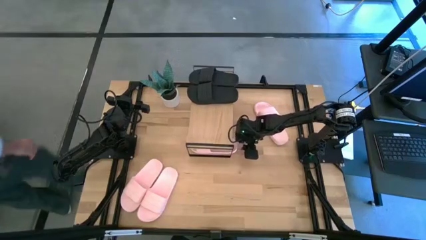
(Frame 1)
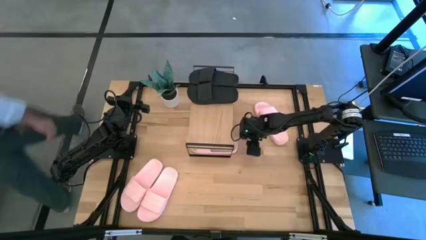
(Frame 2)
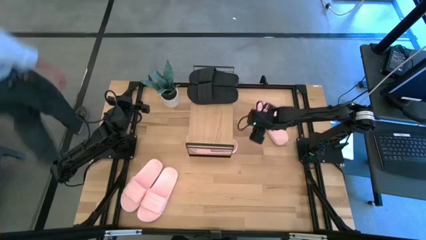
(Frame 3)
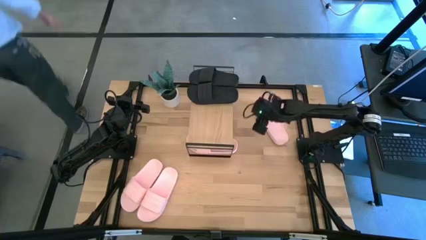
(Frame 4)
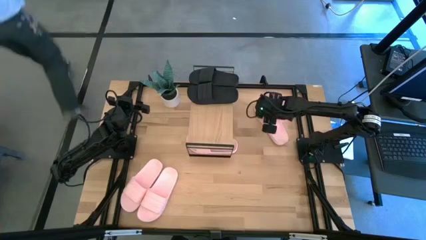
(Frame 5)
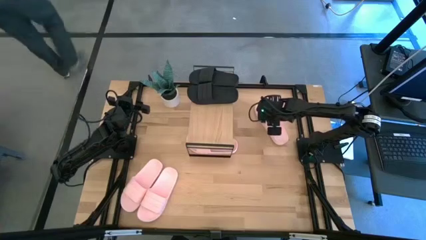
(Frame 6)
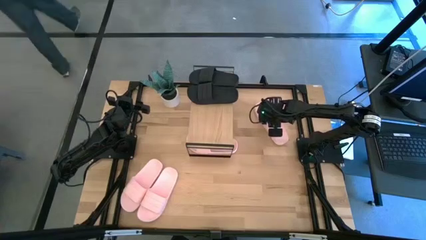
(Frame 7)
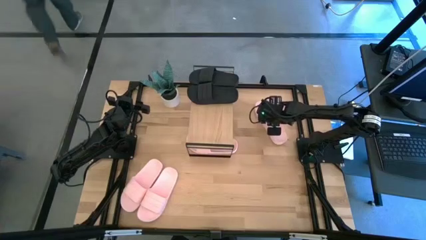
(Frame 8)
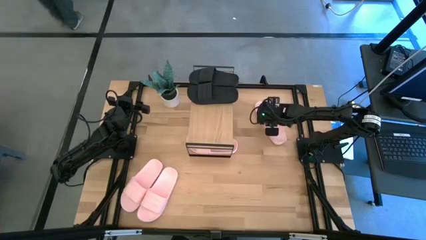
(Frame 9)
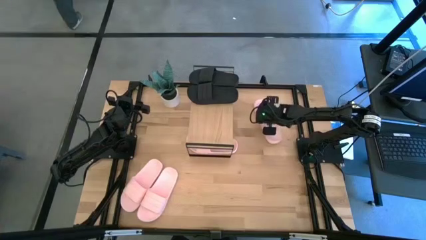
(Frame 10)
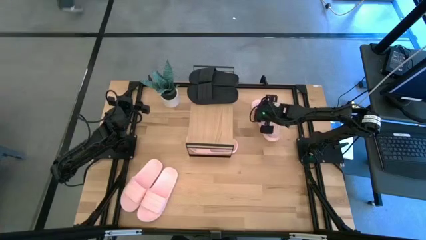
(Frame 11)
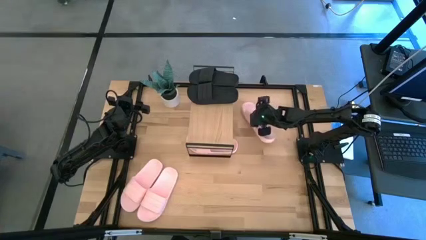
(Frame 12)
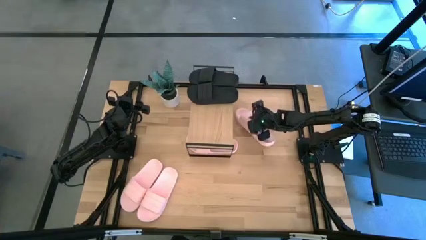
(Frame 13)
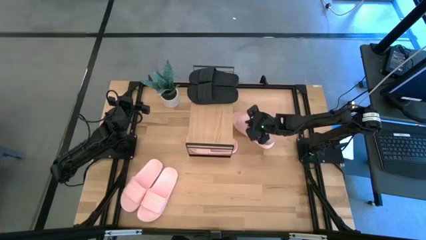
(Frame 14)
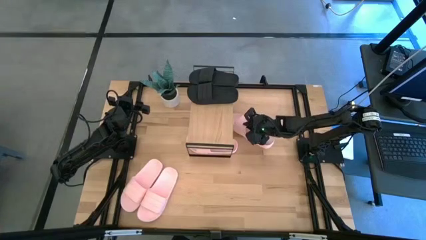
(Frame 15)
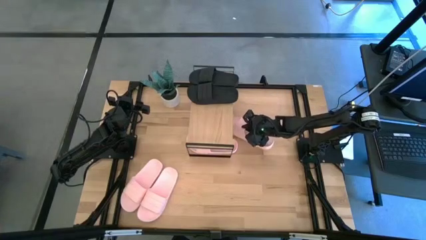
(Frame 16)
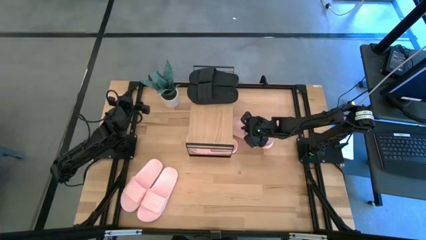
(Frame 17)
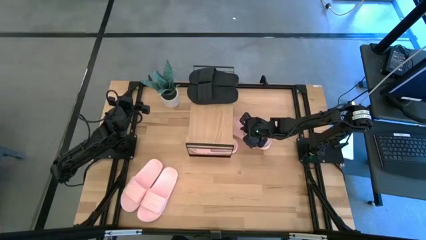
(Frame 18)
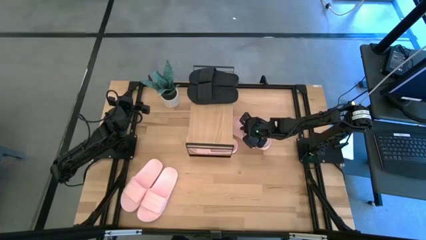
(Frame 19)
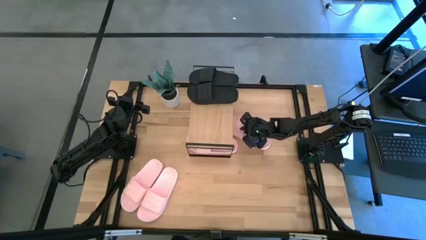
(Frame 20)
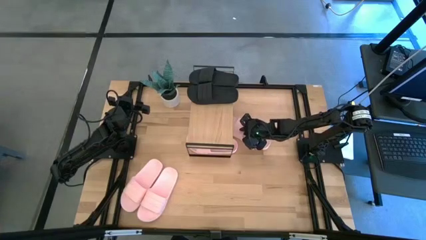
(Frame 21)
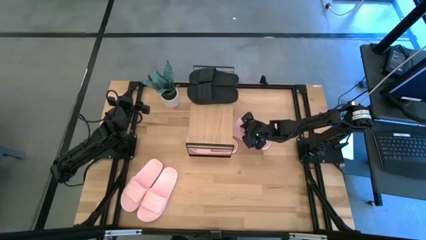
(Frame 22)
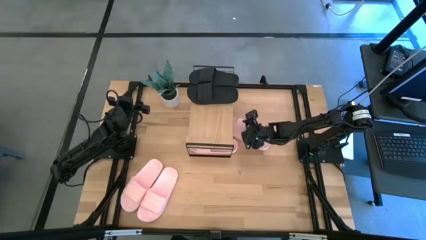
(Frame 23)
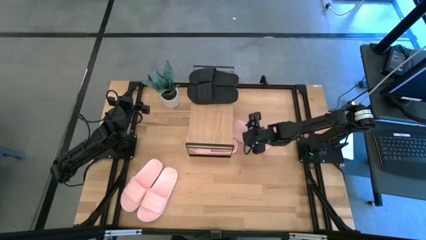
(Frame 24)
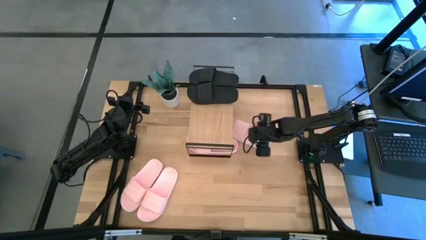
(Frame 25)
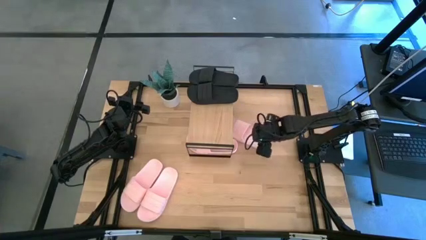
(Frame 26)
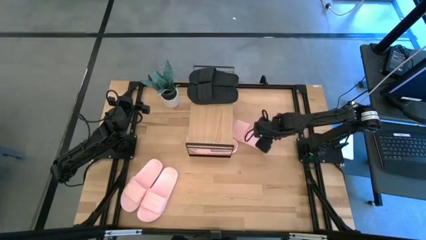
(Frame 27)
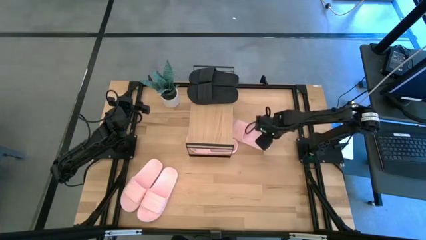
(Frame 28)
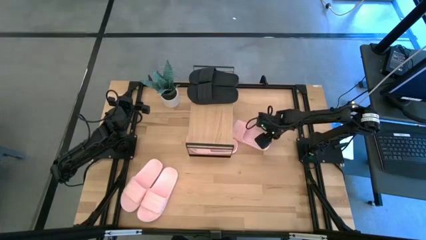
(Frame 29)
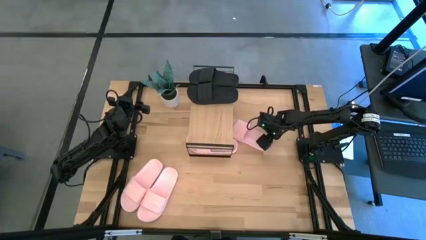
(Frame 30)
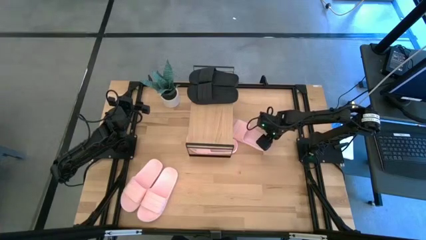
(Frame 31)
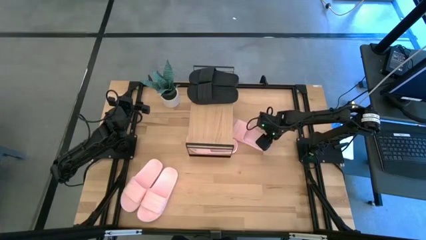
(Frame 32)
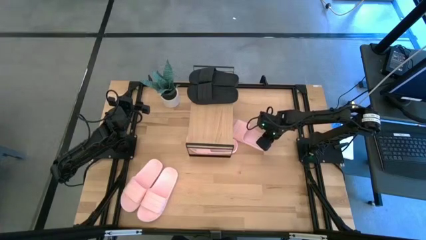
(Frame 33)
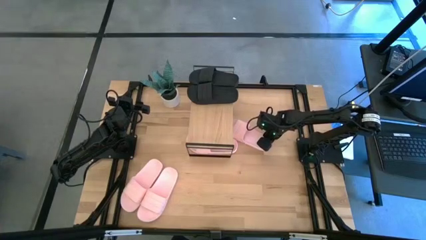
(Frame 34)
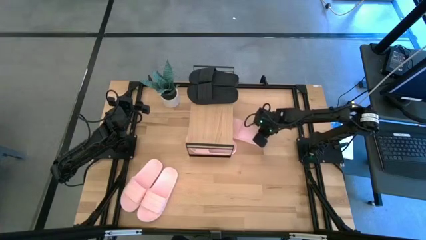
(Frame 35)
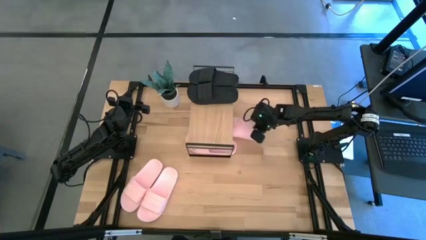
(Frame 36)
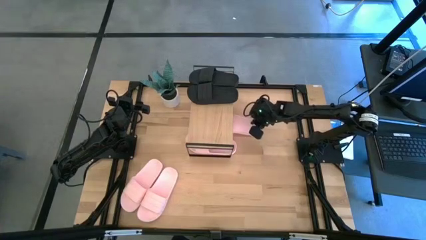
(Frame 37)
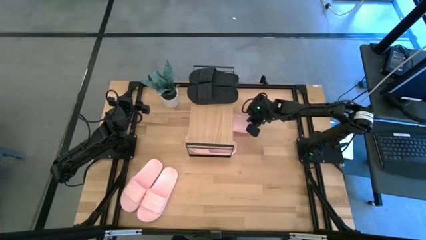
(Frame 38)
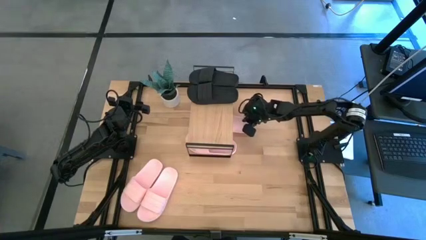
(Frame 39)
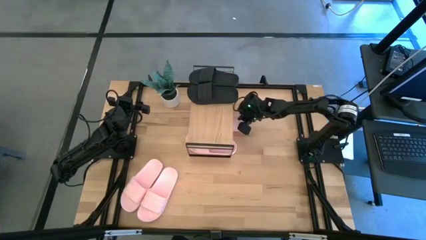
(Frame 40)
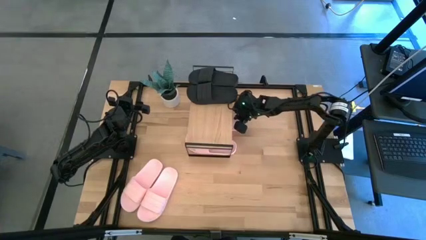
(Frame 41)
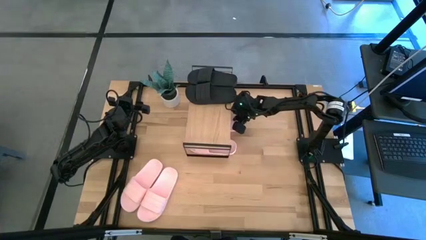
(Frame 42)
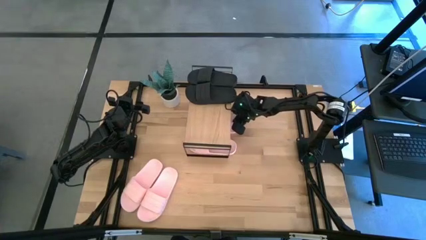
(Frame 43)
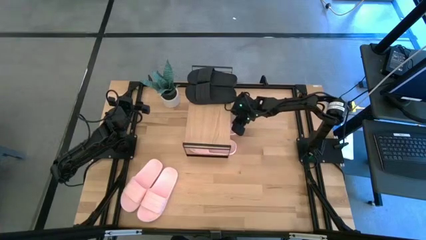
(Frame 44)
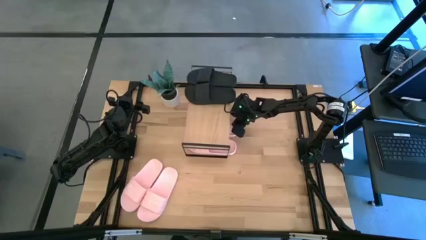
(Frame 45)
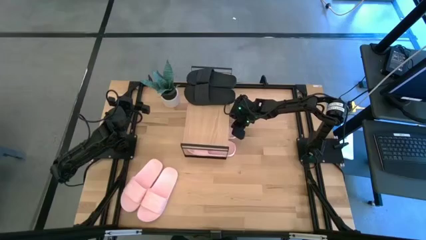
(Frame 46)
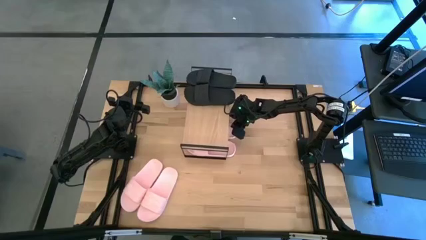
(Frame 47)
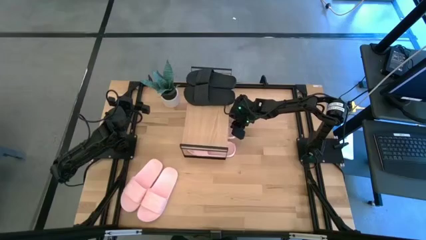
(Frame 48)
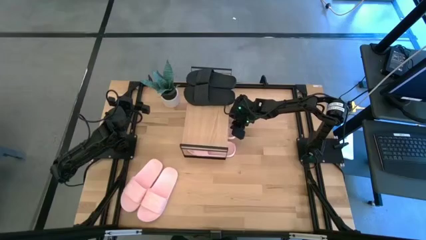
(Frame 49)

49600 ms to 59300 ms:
Task: Pick and place slides into the shelf
Put the pink slide under the shelf

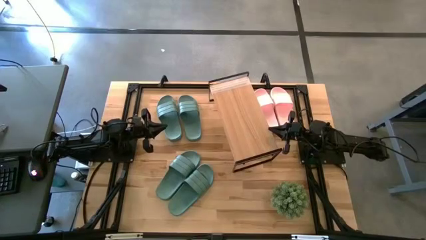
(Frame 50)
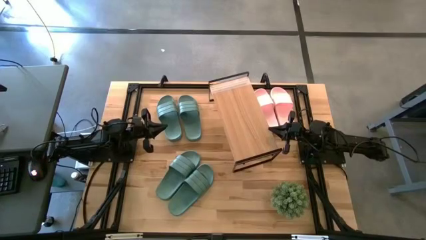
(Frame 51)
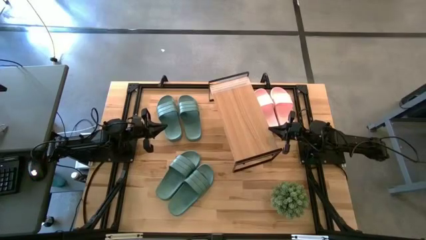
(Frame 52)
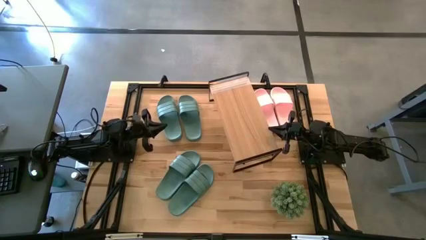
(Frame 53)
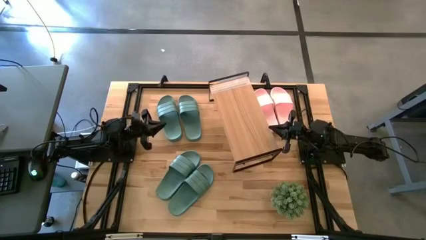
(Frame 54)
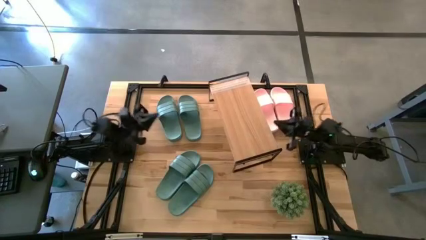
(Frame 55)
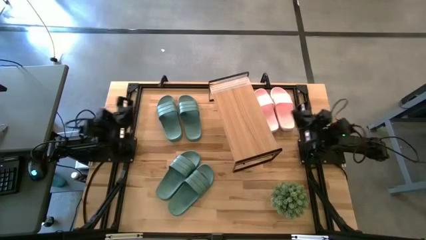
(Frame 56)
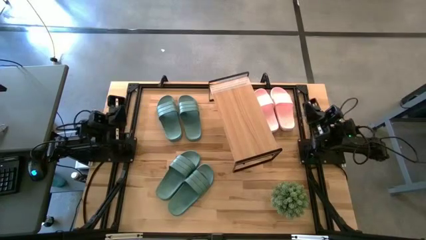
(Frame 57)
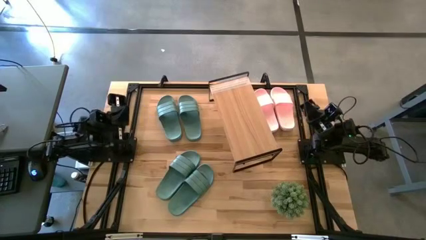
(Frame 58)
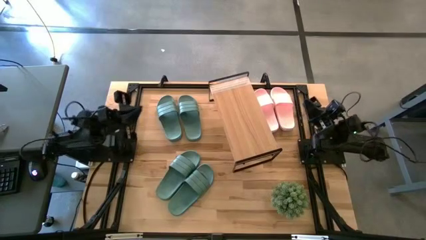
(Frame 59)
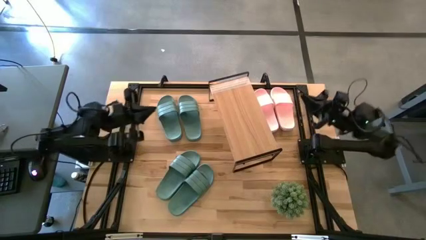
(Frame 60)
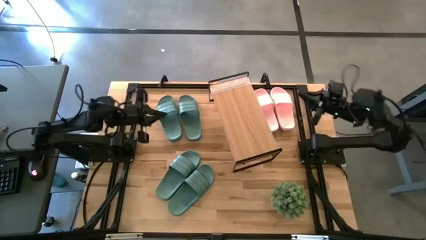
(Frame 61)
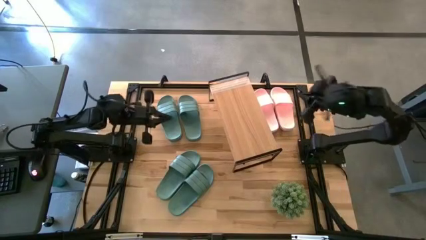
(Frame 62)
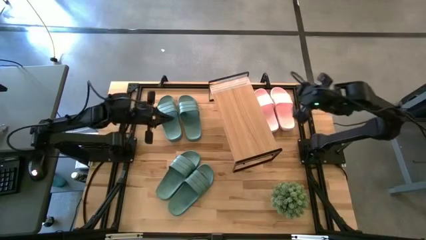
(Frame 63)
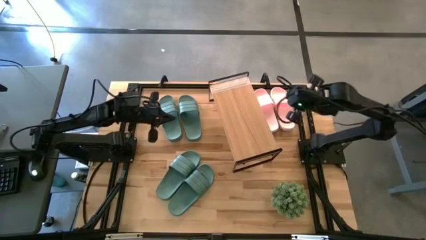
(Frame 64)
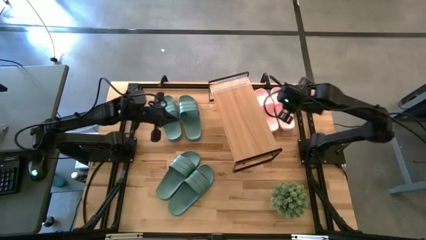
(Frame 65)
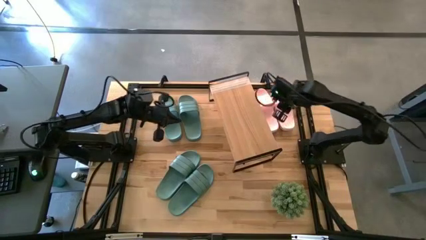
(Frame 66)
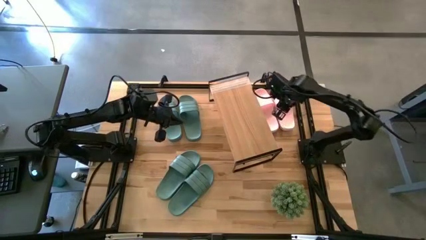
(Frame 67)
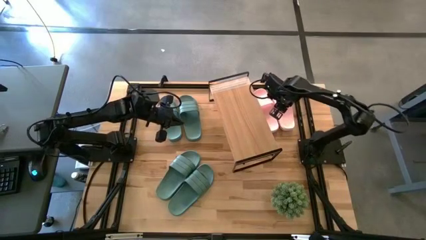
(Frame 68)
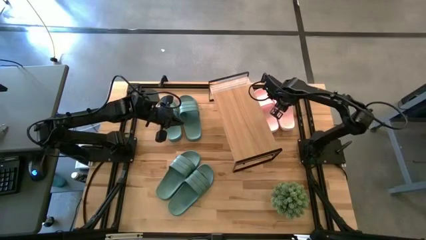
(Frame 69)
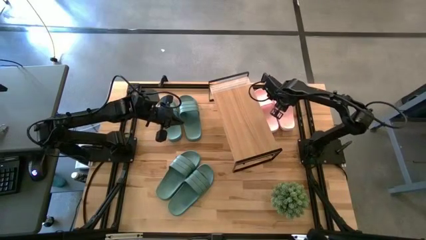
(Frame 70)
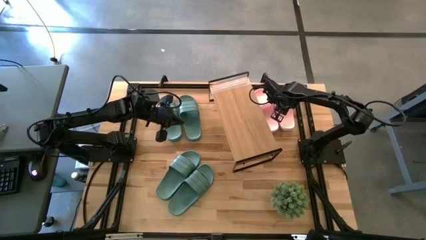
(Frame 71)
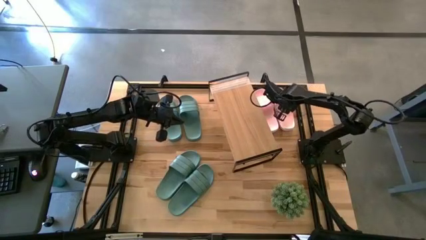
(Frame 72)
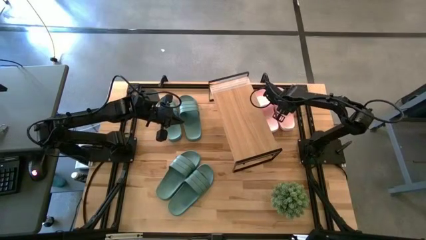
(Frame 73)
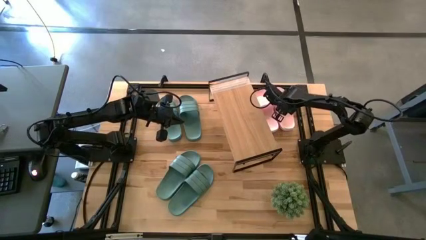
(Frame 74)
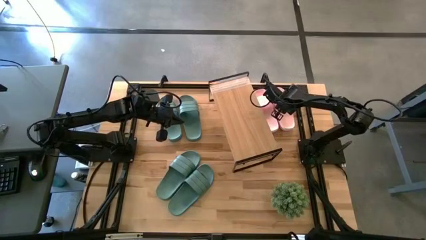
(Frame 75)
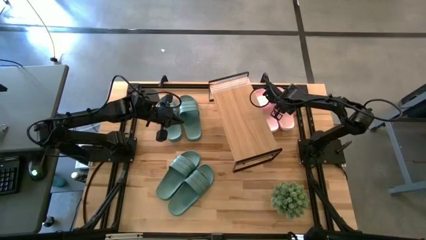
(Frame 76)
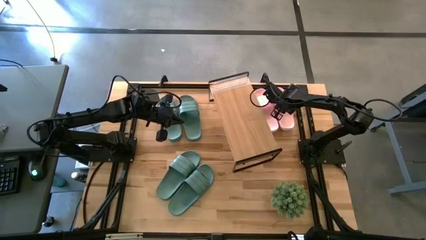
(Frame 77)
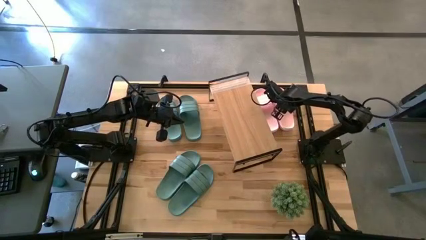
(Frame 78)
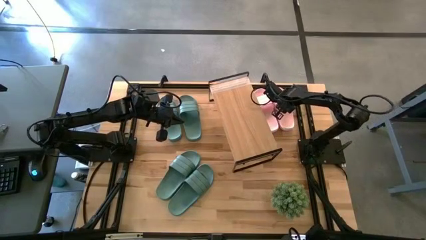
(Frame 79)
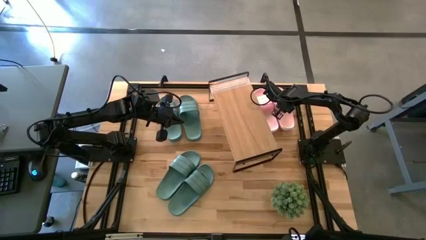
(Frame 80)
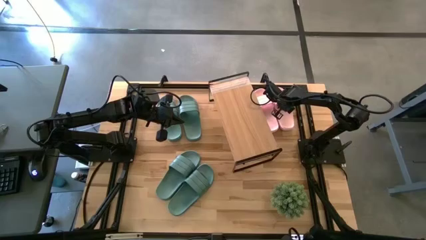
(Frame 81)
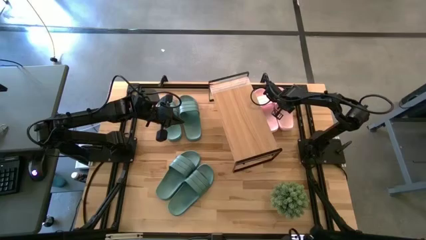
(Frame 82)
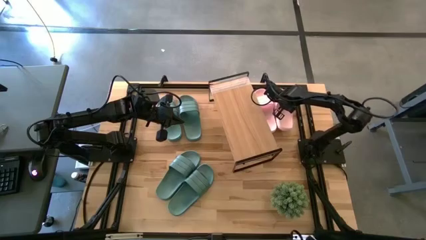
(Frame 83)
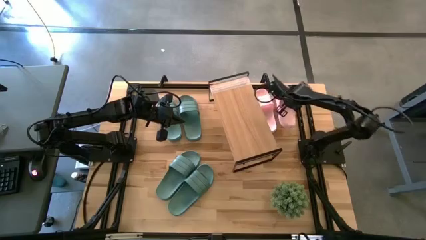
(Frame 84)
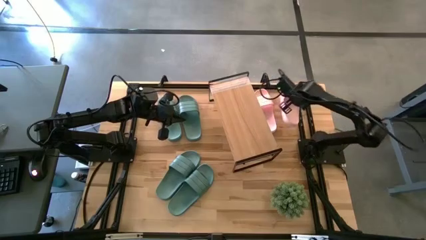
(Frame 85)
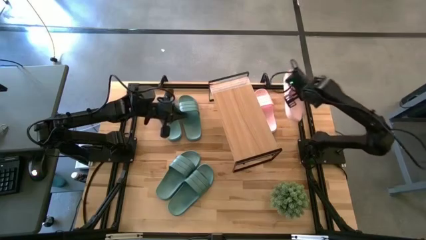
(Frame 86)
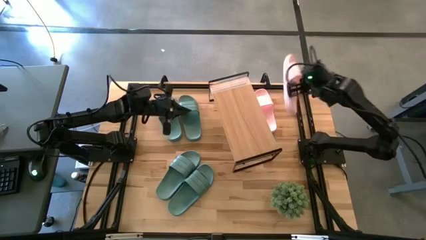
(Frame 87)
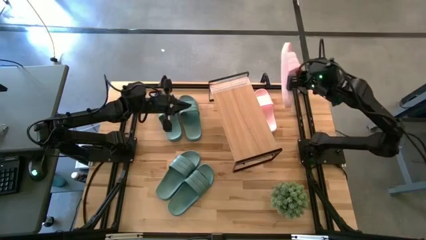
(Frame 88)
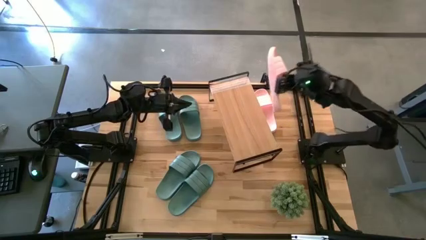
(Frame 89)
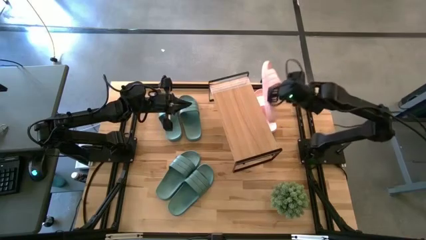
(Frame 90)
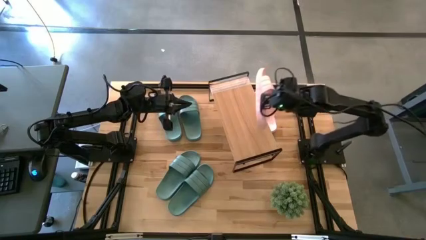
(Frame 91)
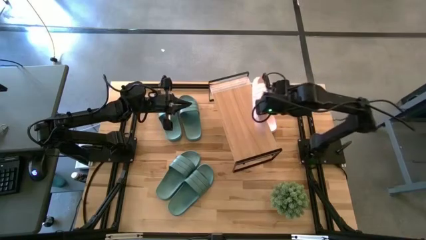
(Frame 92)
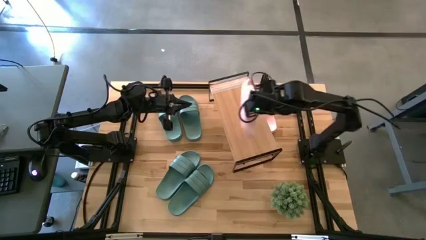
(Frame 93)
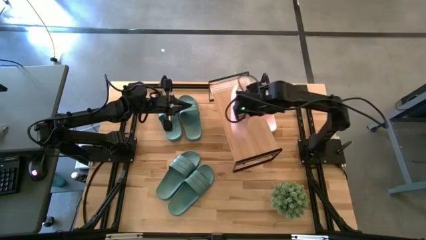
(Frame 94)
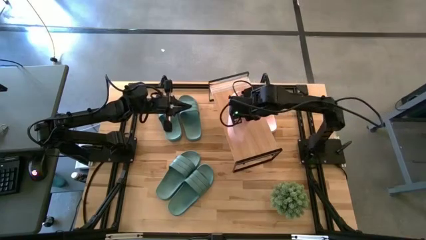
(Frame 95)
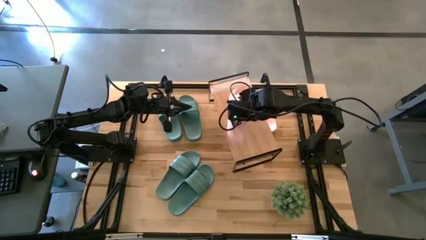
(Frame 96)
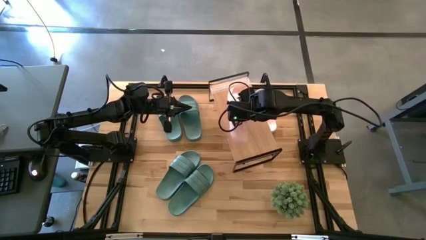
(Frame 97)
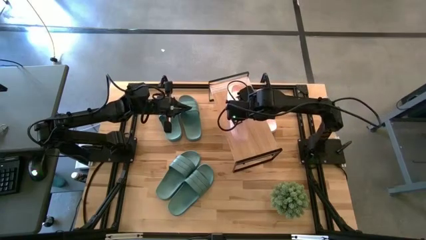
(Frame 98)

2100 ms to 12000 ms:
Task: Pick and place slides into the shelf
Put the pink slide on the shelf
